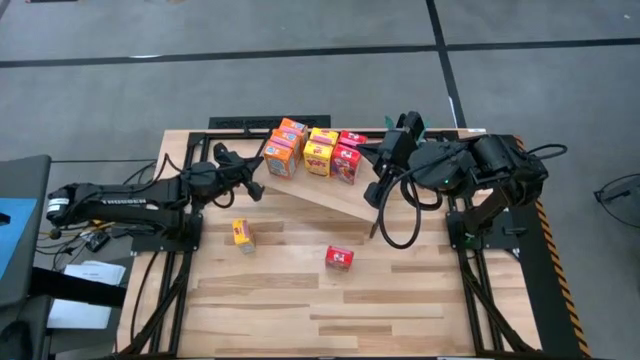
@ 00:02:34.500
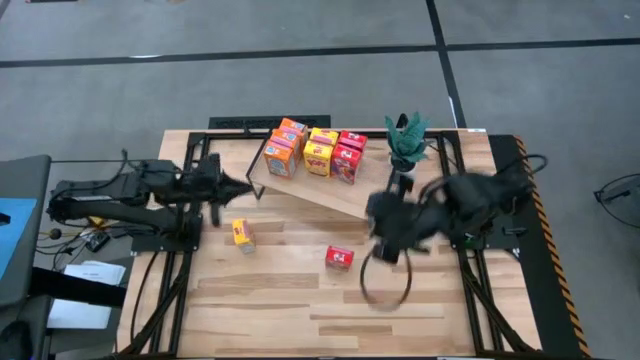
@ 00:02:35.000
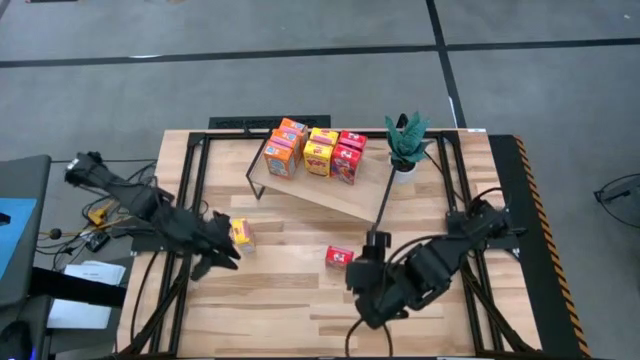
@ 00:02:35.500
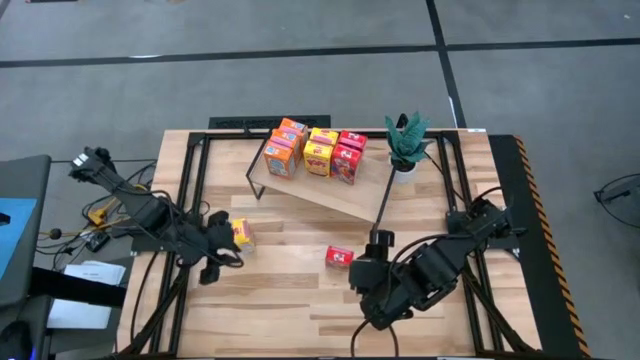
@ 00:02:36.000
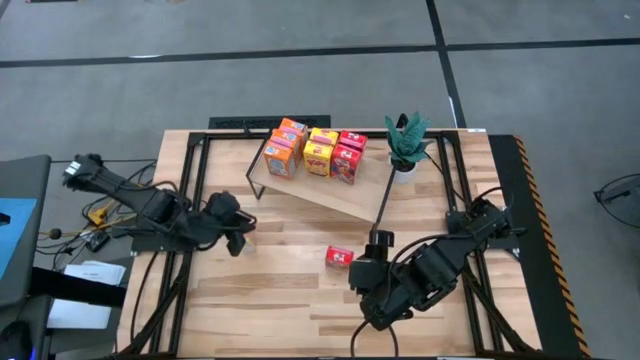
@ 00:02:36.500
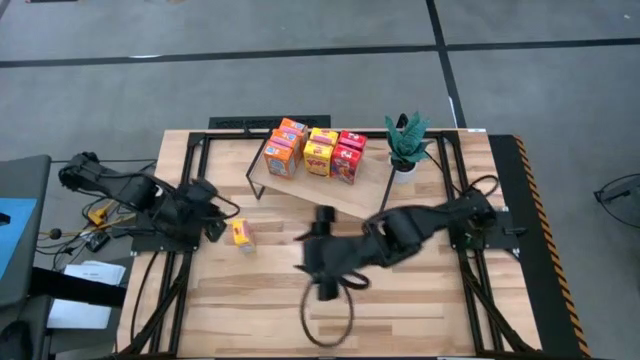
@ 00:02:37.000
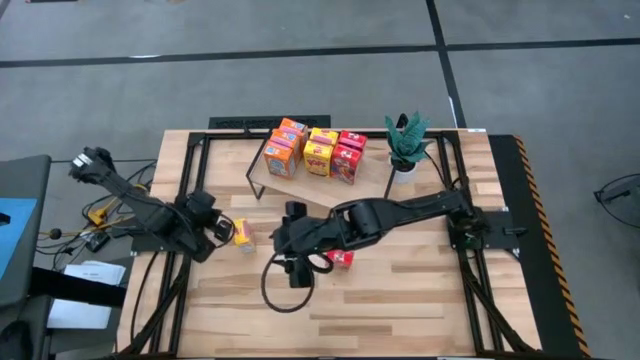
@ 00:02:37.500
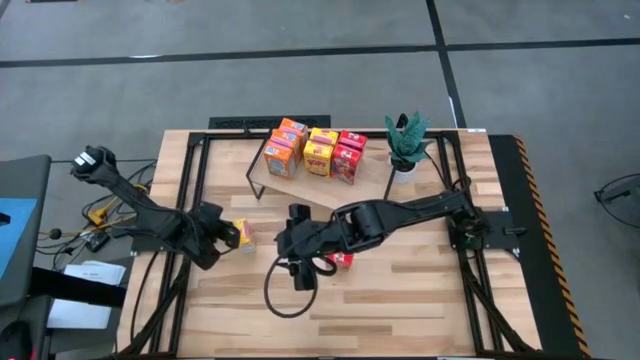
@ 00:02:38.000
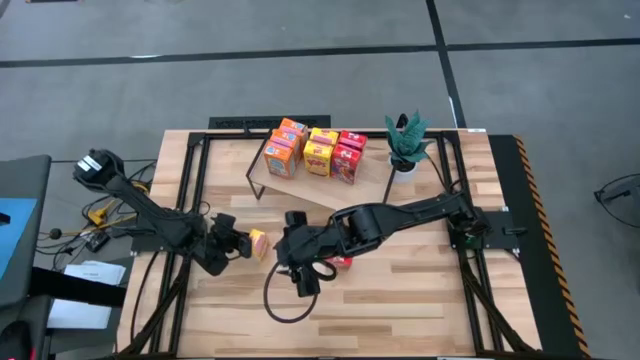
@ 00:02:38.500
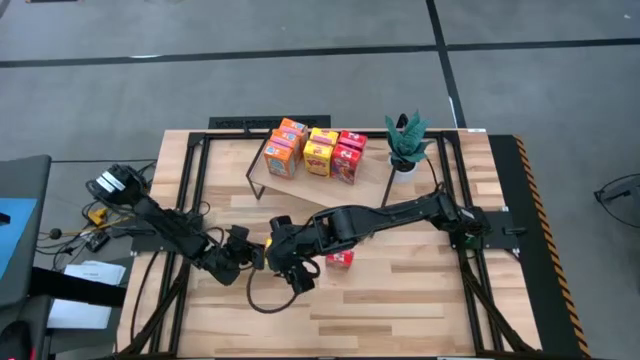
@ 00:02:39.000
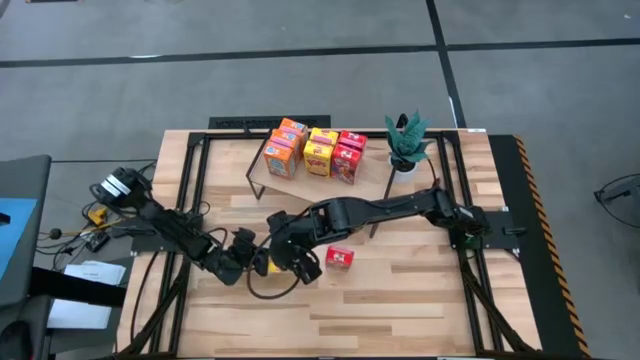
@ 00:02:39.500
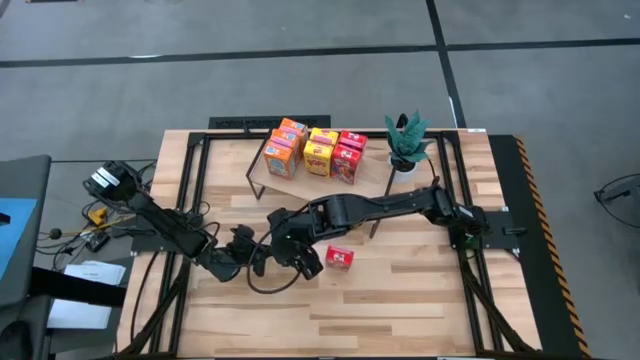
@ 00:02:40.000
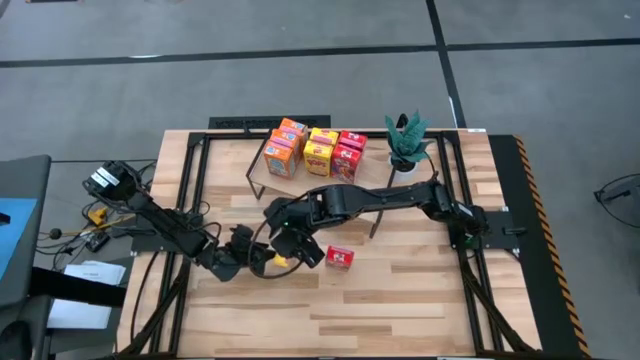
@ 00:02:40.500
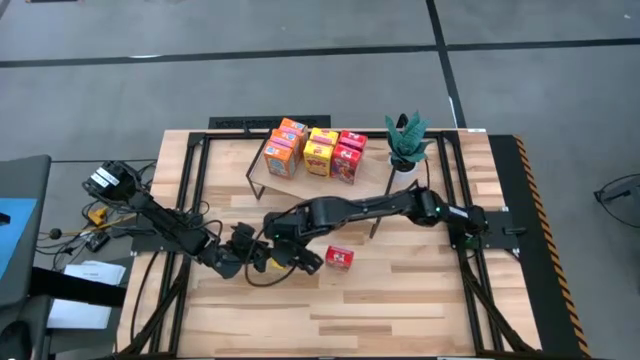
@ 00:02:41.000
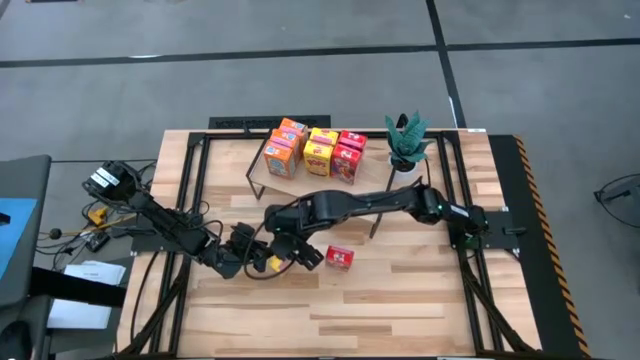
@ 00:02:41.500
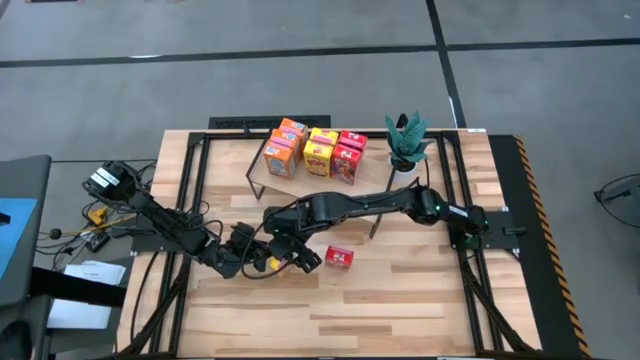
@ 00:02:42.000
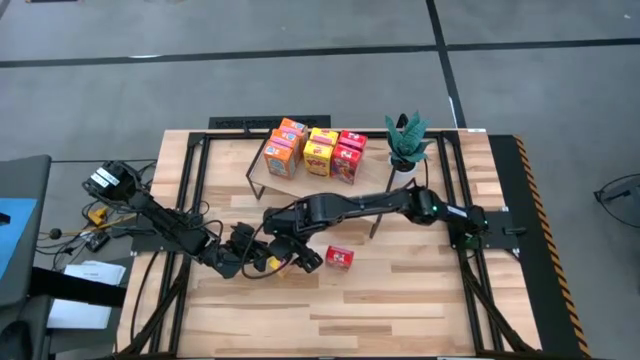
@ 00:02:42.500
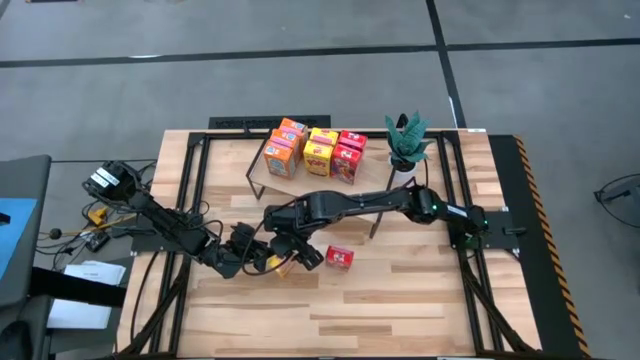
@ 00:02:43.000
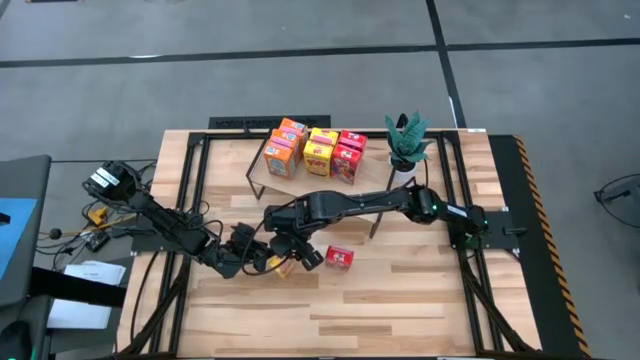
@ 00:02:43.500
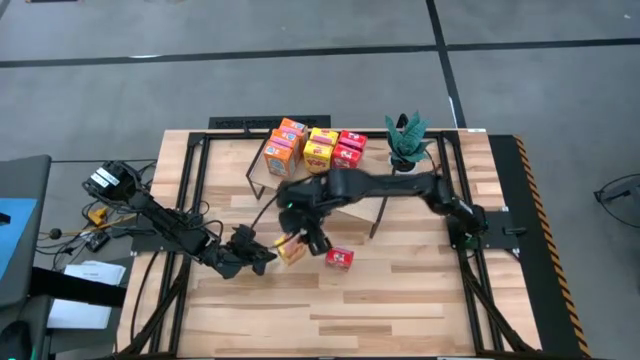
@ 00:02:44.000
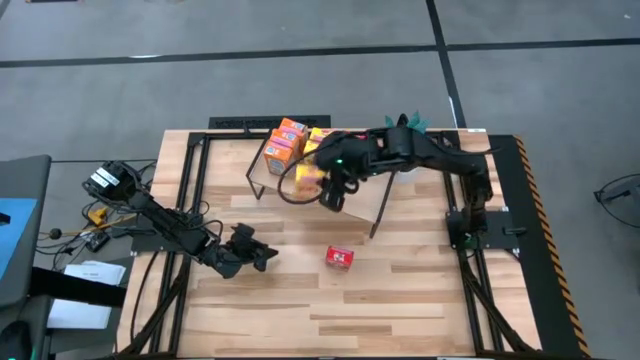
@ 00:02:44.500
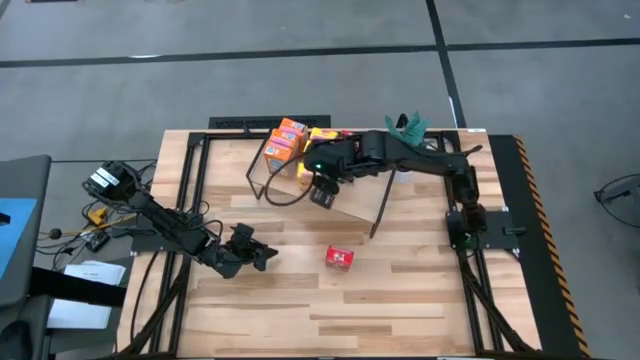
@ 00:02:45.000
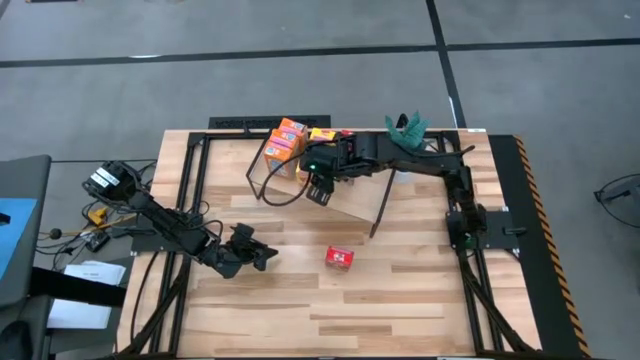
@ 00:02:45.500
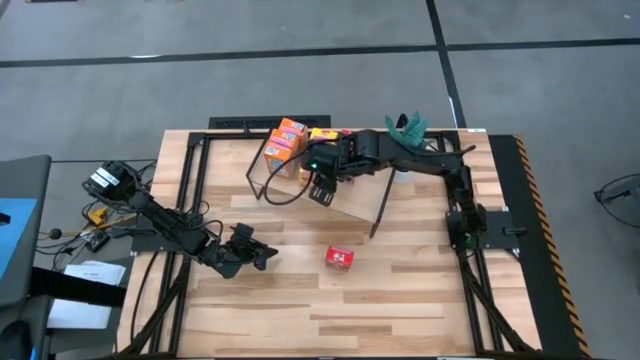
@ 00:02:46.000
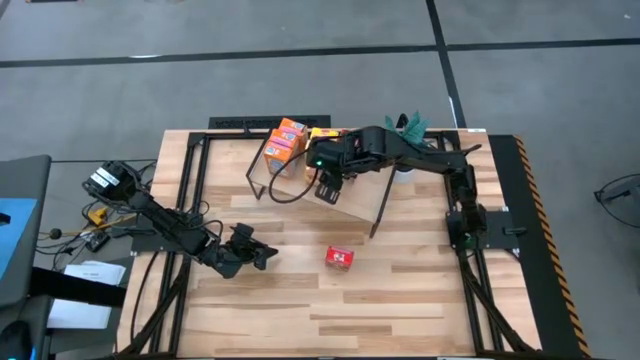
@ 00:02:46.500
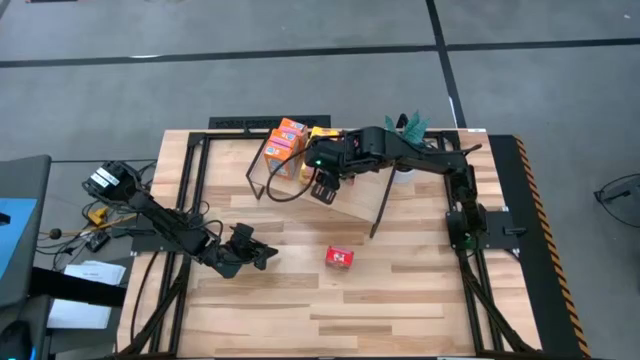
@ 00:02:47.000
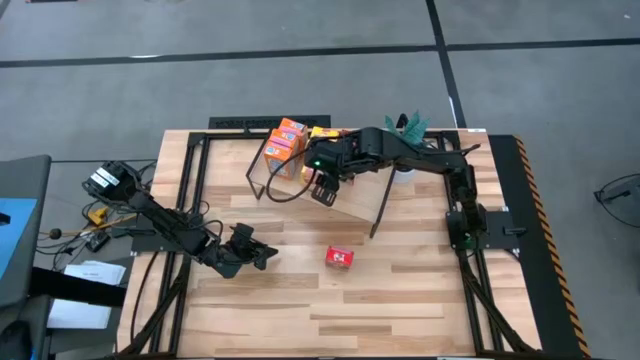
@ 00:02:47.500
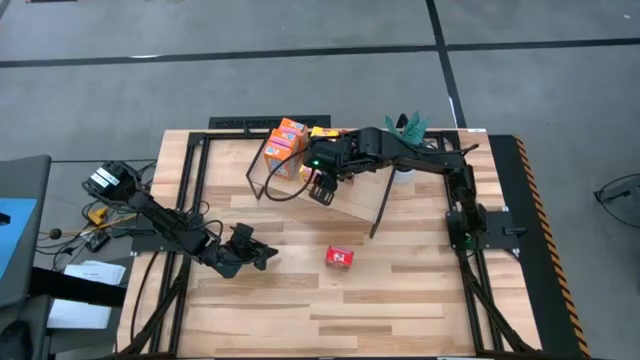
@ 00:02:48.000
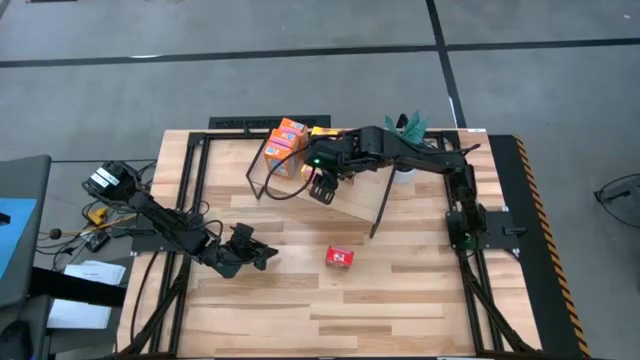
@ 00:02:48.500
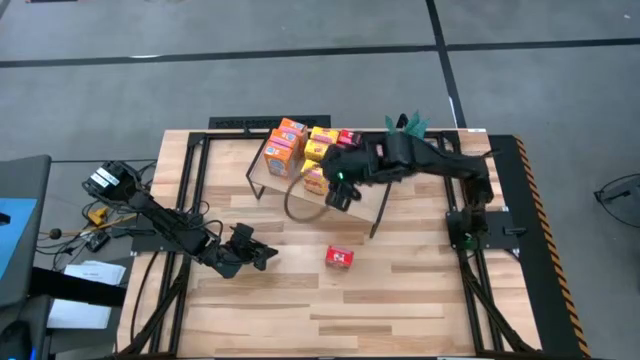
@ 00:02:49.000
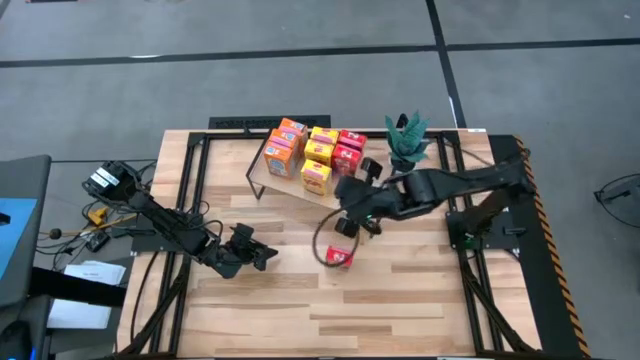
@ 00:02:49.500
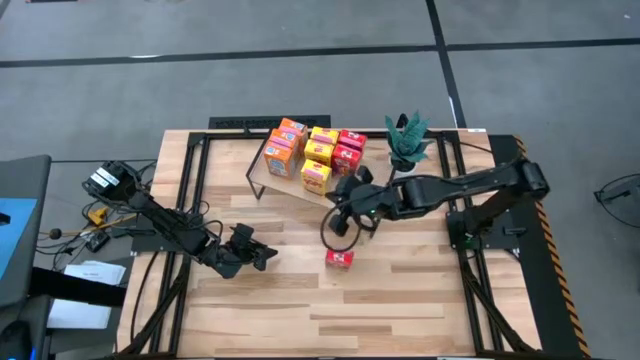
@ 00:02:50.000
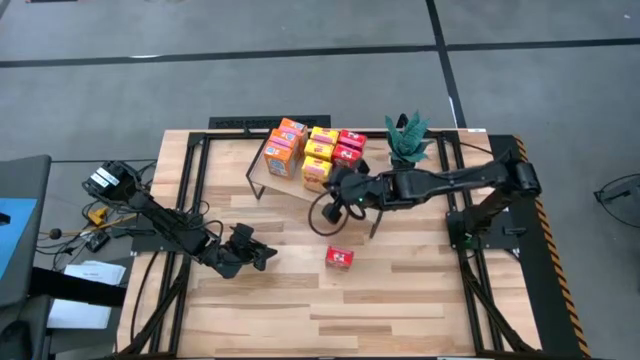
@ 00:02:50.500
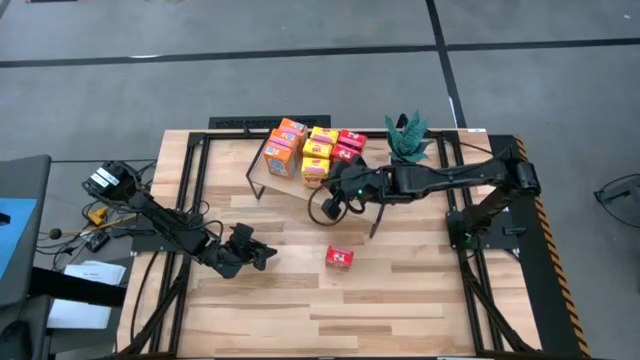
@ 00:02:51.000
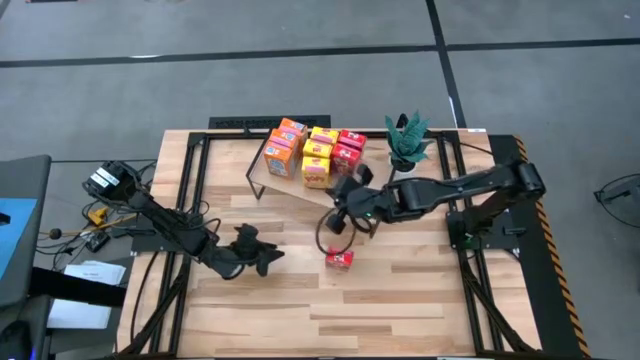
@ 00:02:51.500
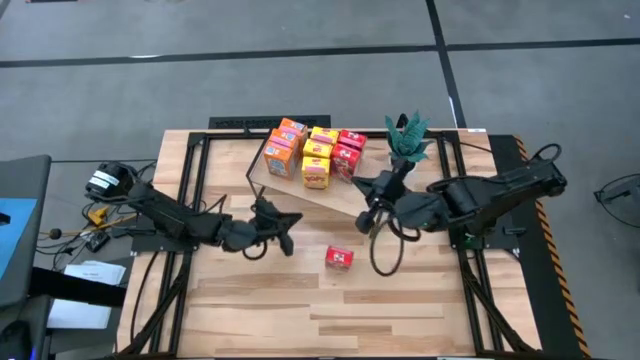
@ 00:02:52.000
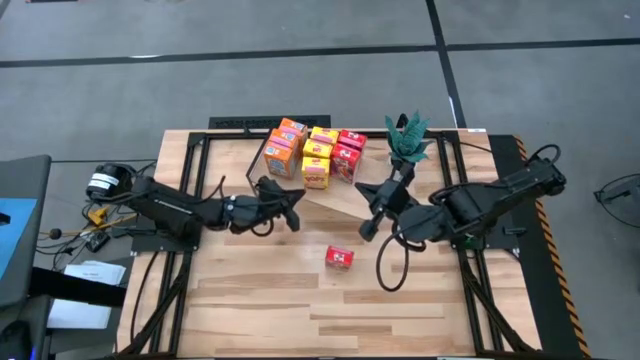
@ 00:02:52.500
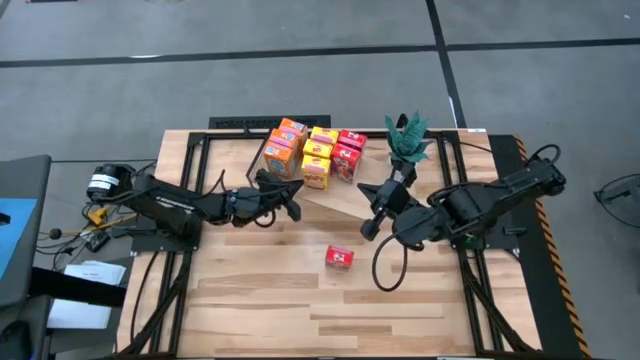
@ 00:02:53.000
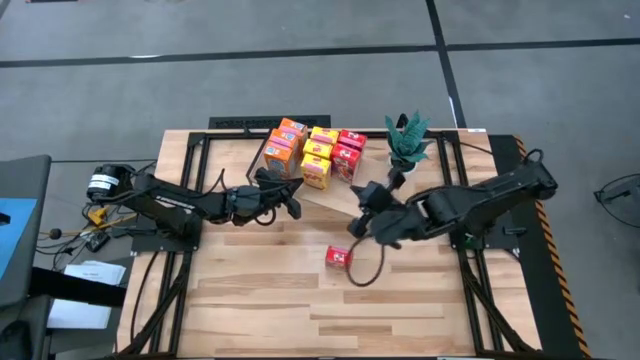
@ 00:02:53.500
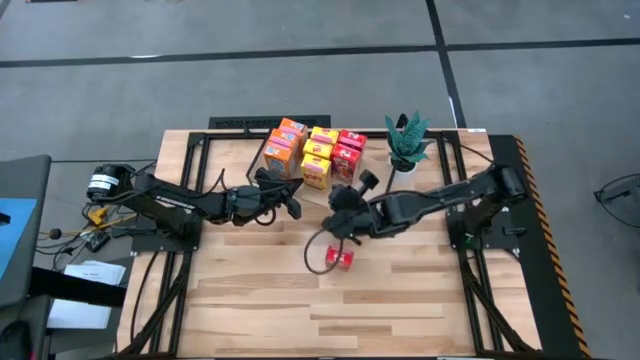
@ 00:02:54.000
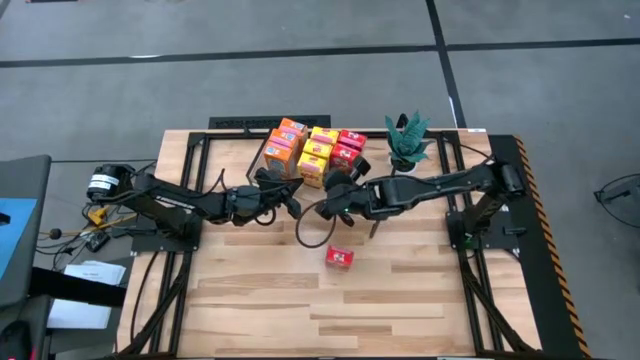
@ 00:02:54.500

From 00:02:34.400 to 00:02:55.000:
Task: Stack cereal on shelf
Put the yellow cereal box aligned with the other orange cereal box on the shelf
